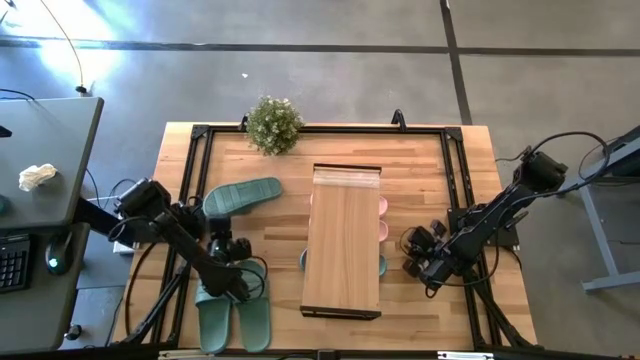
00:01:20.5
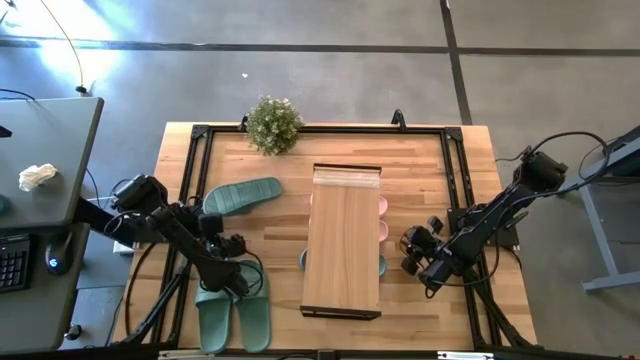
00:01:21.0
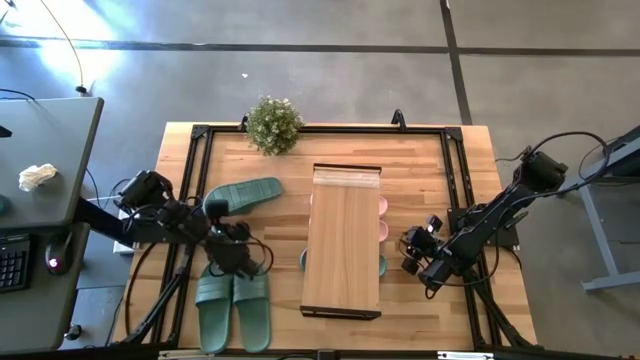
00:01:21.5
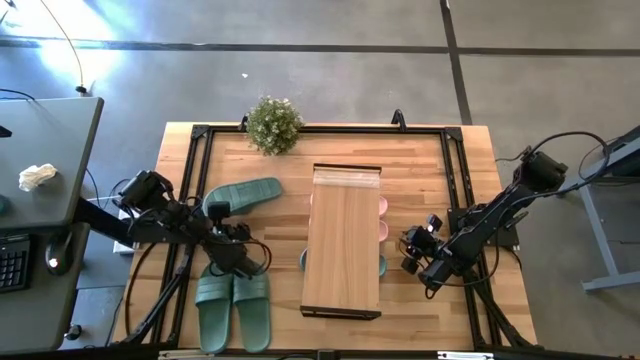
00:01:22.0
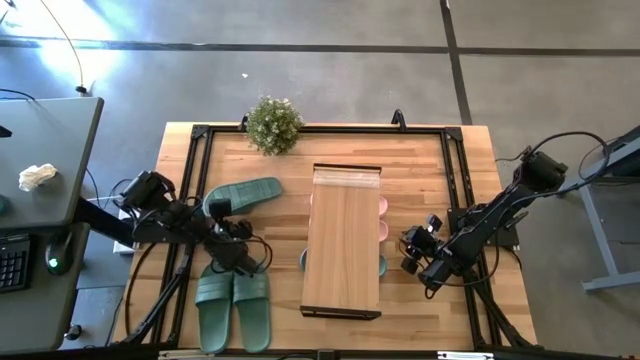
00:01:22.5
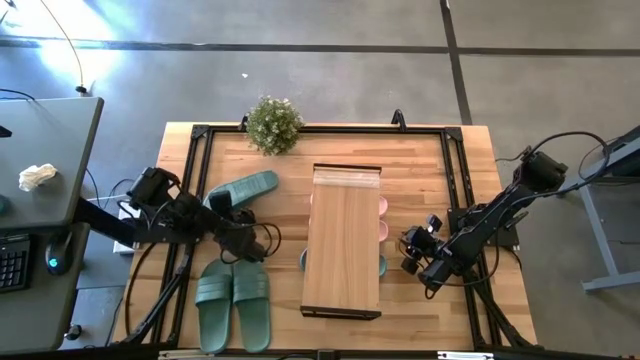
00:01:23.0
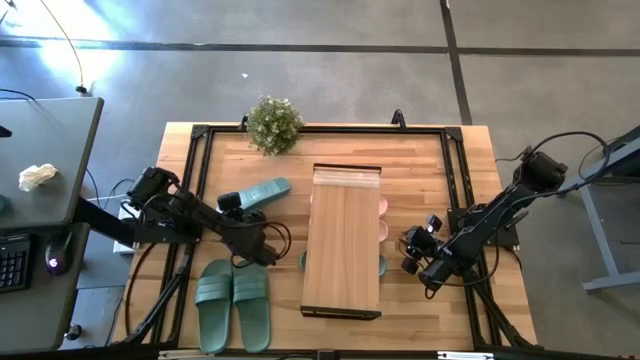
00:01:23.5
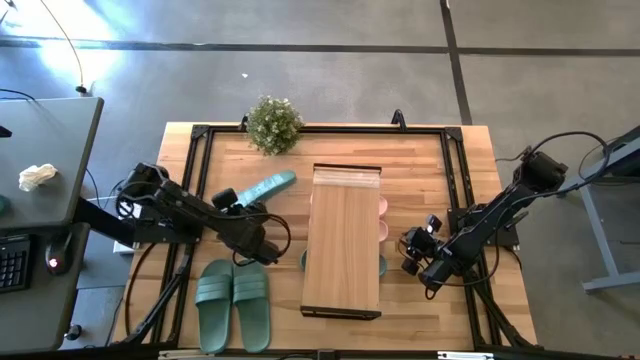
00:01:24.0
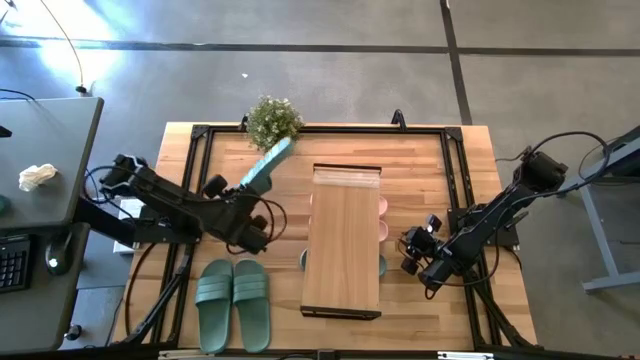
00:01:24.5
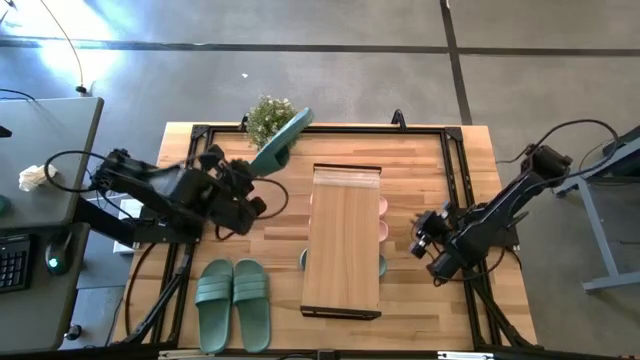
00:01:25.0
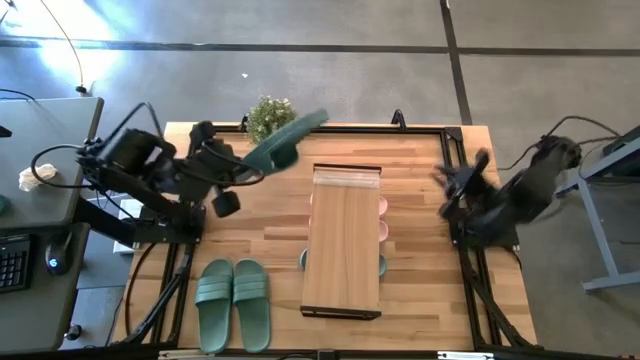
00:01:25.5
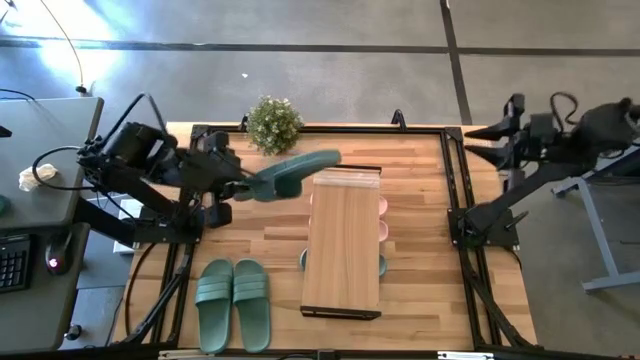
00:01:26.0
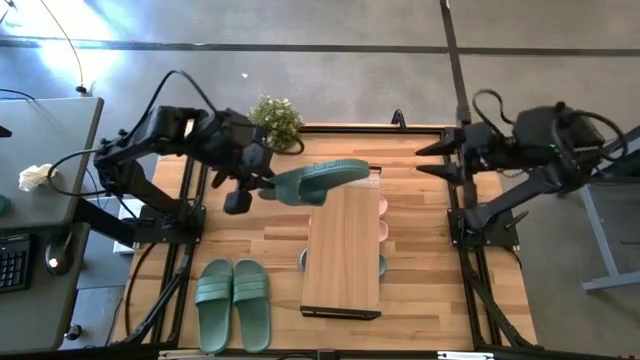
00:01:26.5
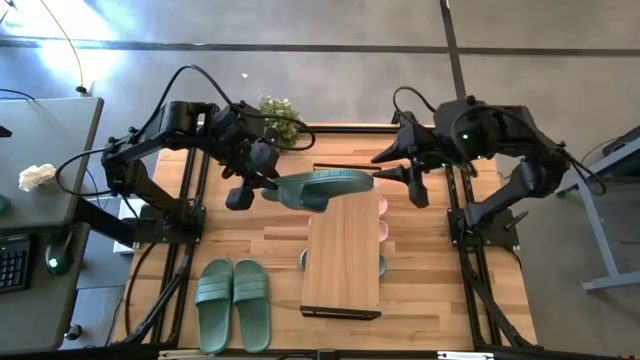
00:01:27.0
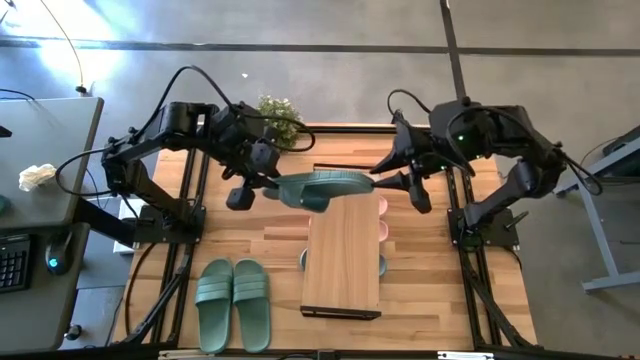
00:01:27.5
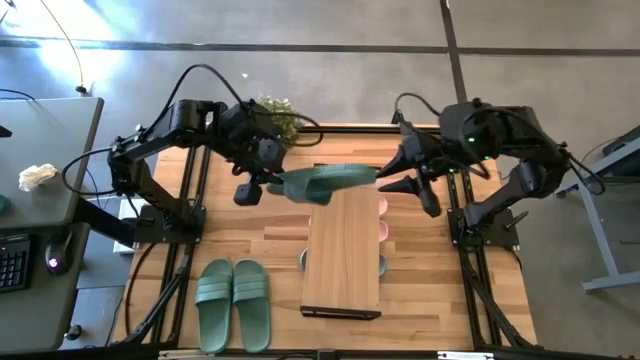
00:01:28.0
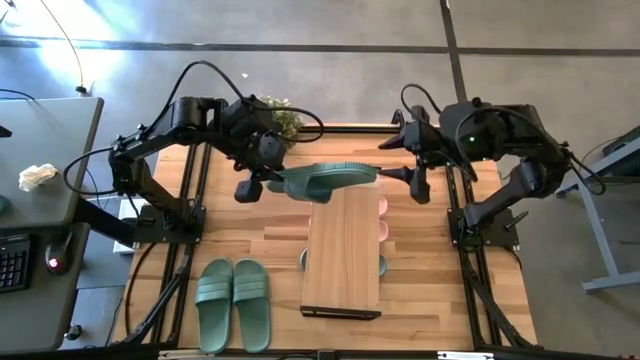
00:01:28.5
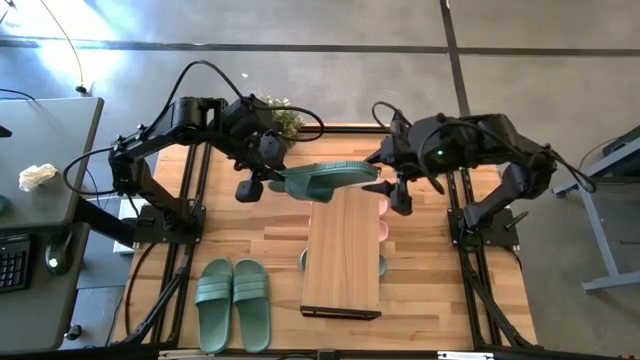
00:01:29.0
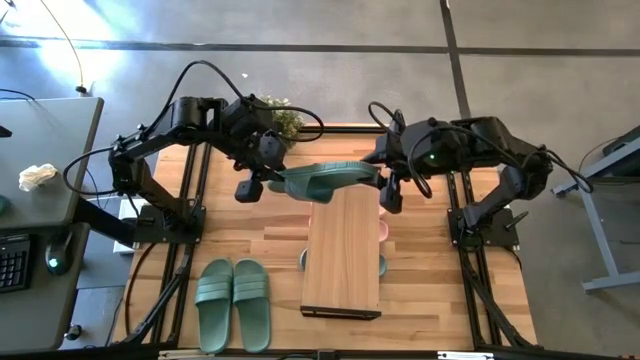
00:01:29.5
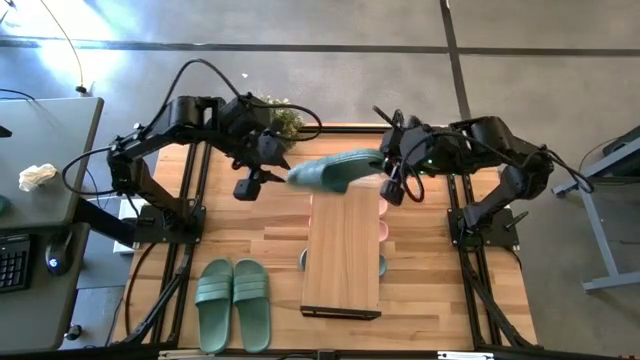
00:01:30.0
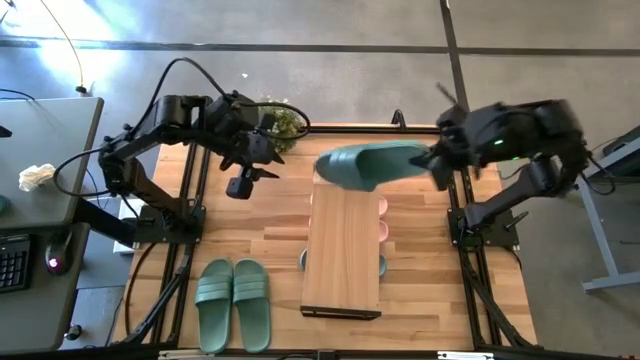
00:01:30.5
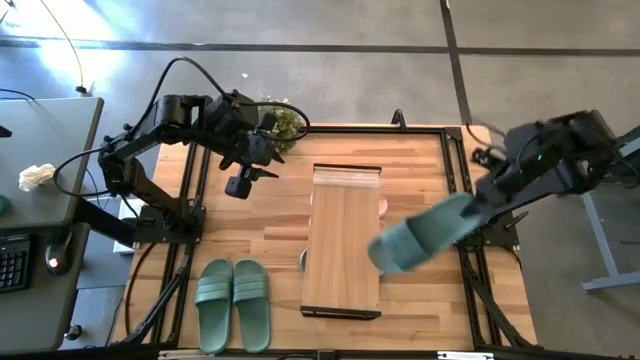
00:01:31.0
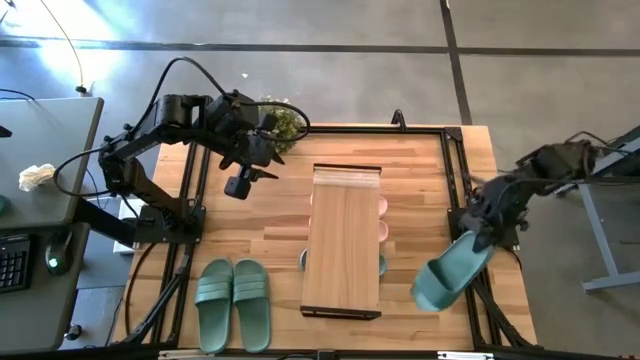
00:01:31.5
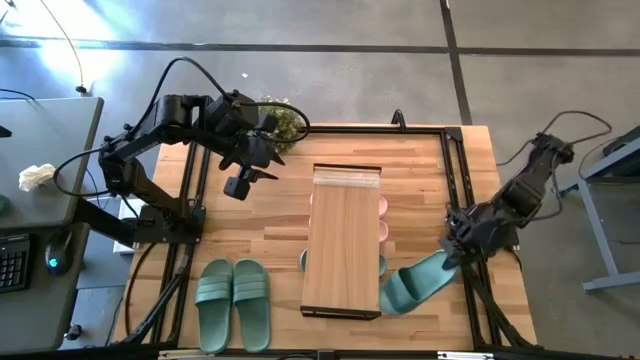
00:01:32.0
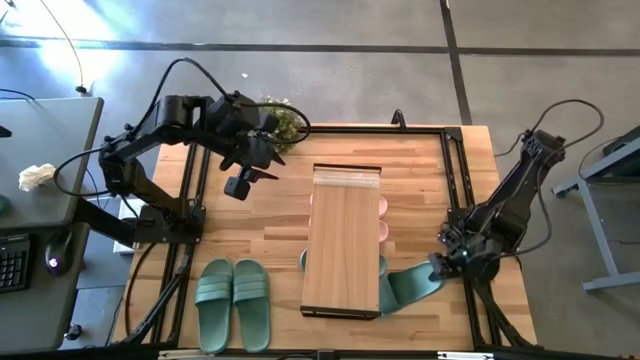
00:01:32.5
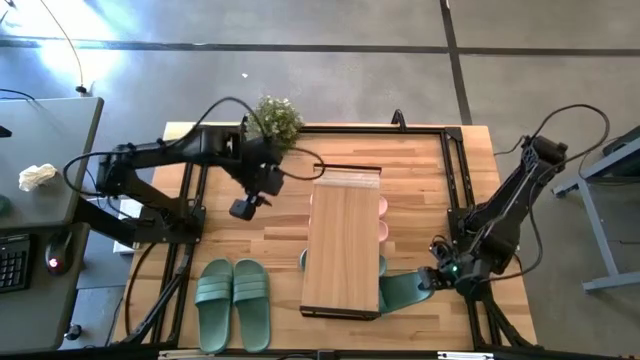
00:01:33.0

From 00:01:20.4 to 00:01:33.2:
Task: Pick and place slides into the shelf
Put the top green slipper under the shelf

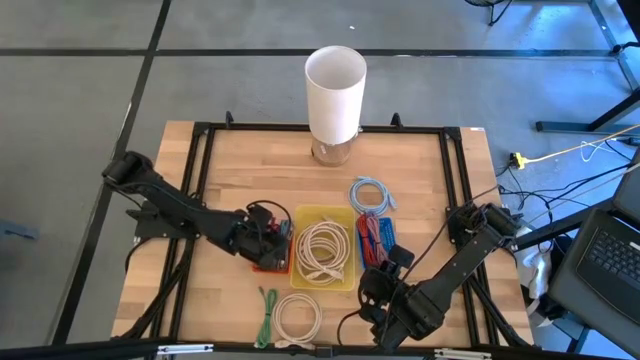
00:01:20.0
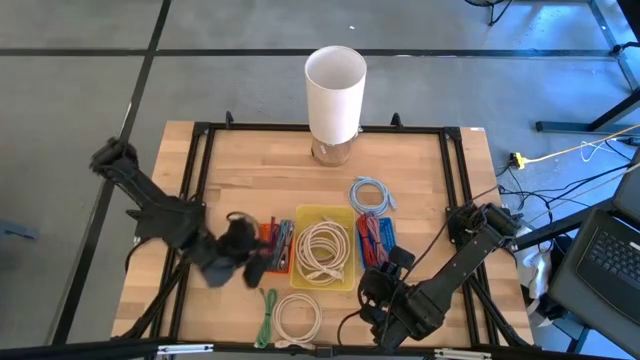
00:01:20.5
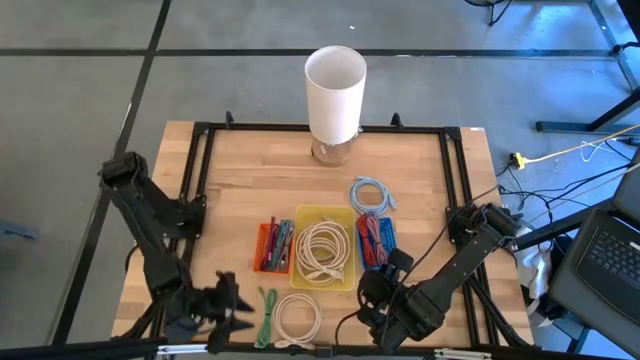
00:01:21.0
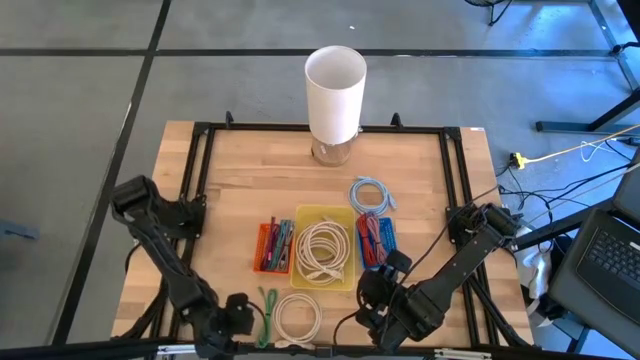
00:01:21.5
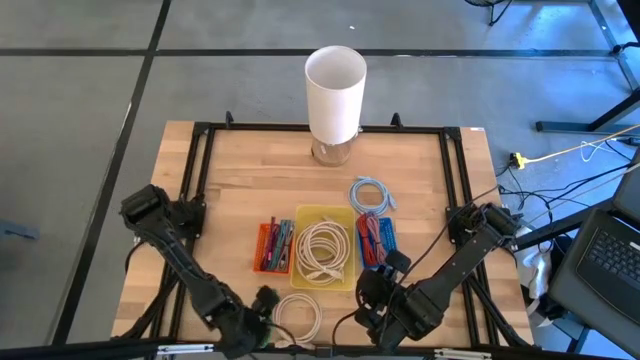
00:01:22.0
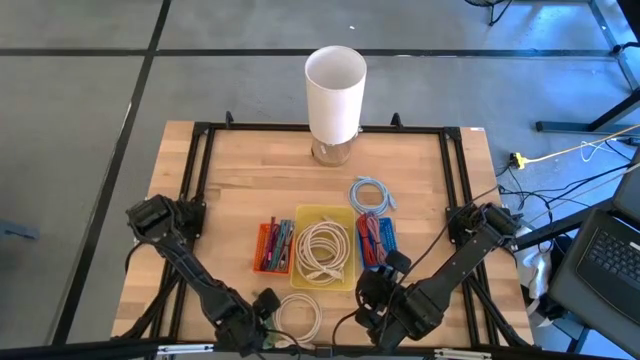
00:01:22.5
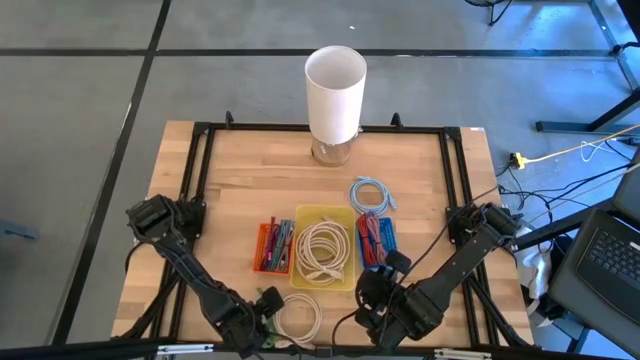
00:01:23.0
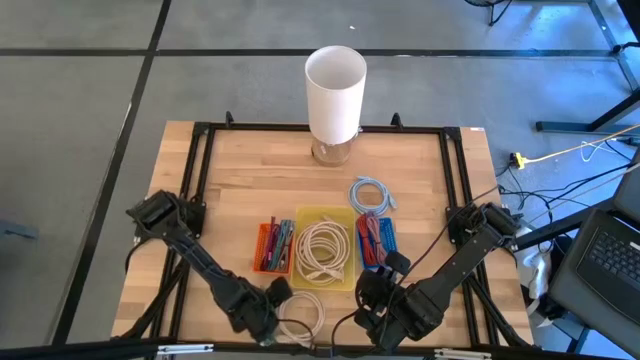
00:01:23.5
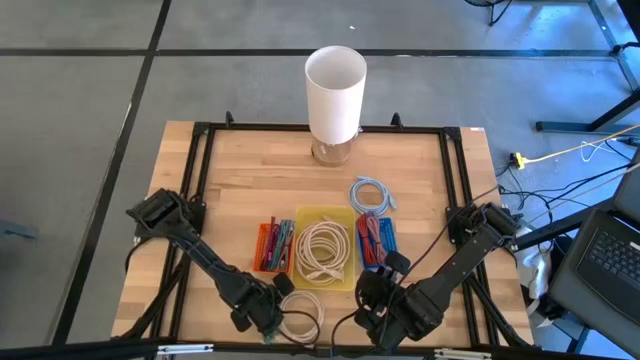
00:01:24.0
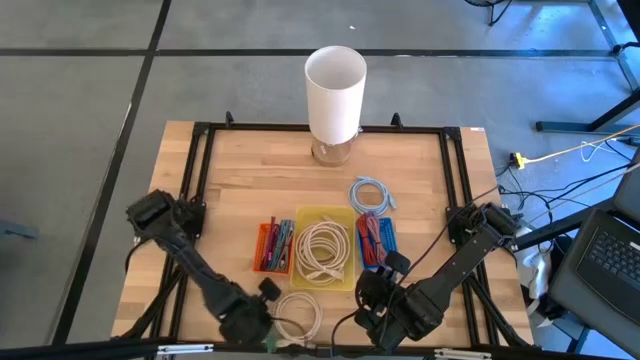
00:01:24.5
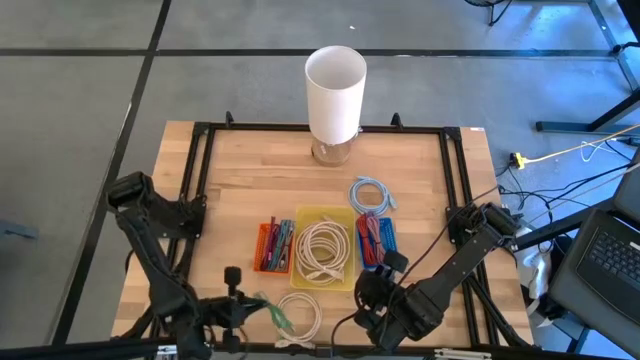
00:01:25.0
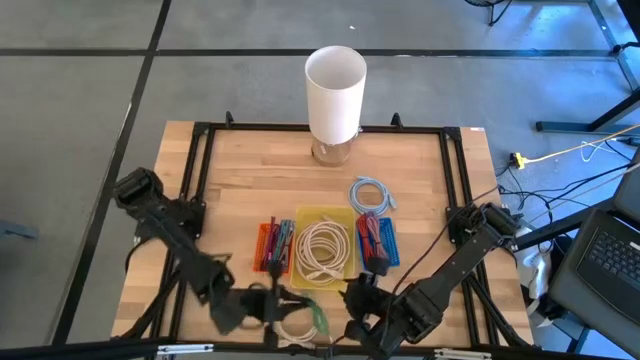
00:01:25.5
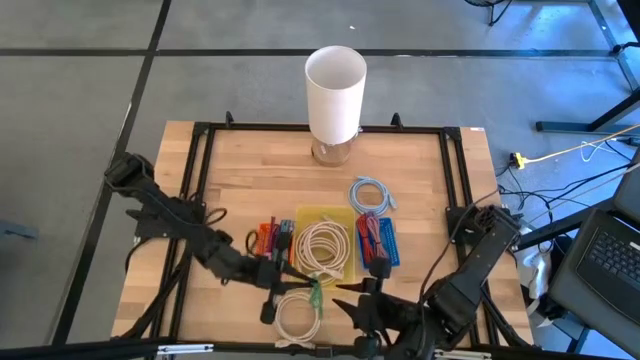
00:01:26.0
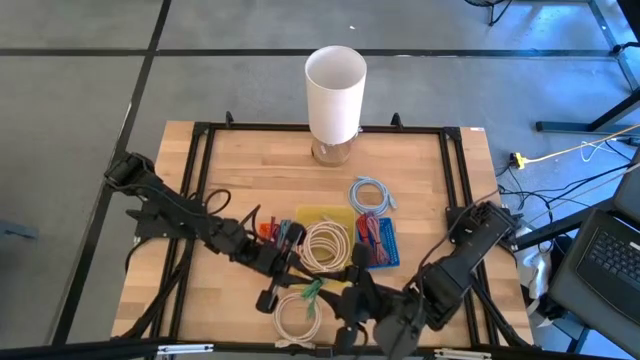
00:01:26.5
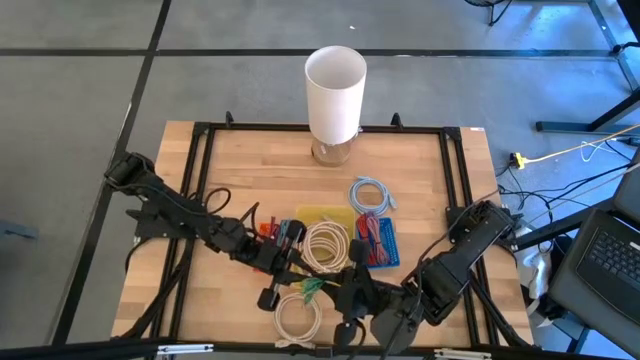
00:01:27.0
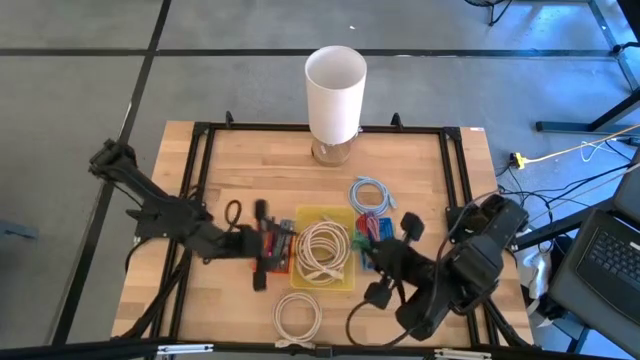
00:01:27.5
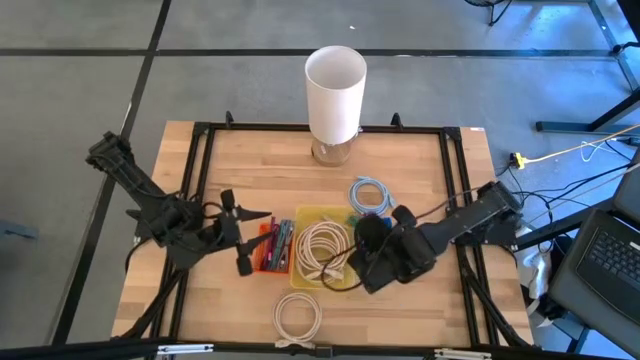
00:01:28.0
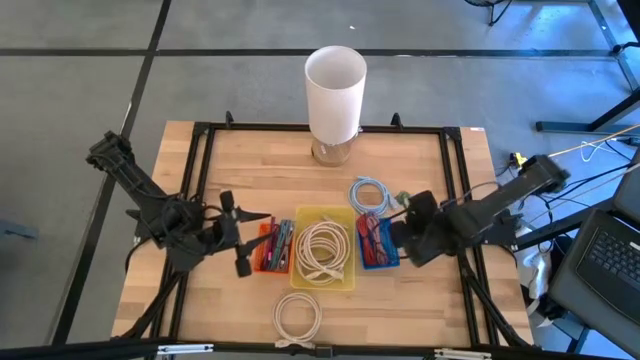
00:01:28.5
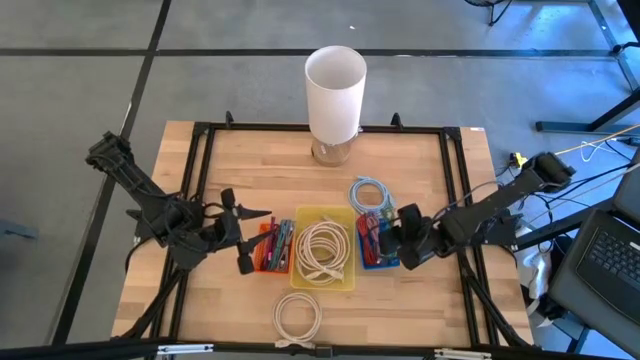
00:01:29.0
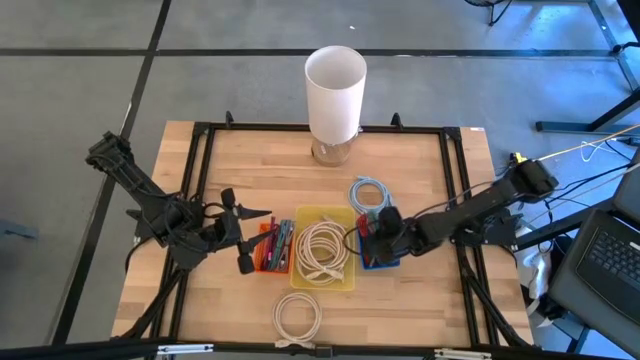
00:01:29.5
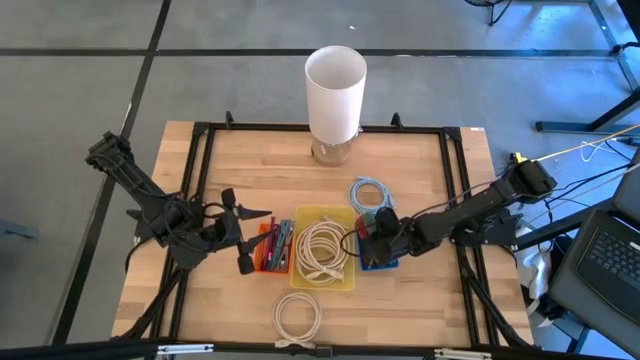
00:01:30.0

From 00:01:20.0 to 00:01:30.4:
Task: Pick & Place USB Port
Put the green charger cable into the blue bin
